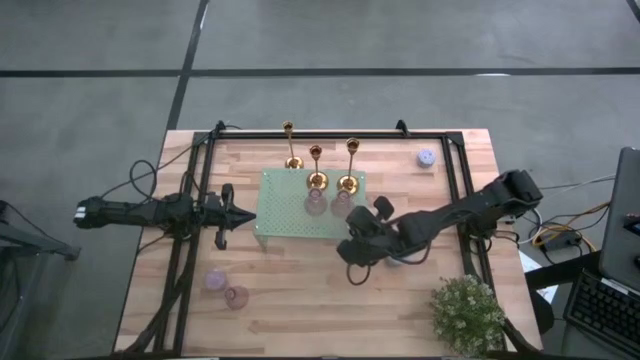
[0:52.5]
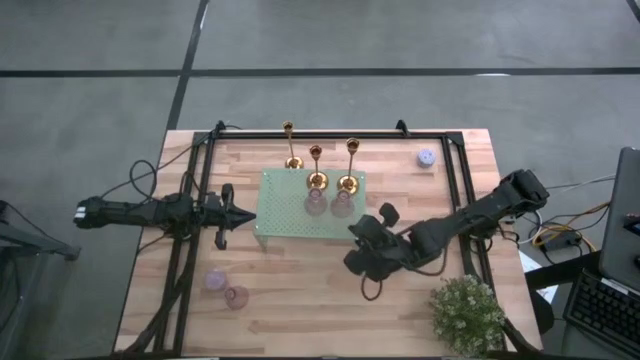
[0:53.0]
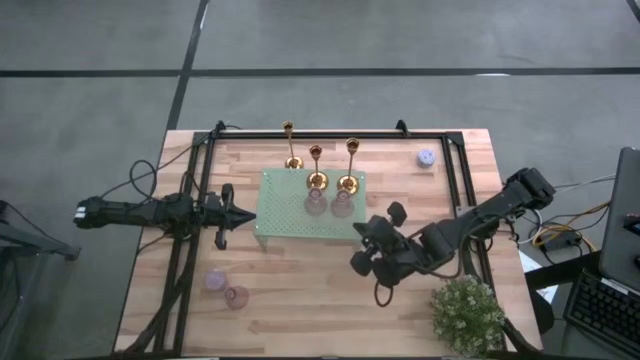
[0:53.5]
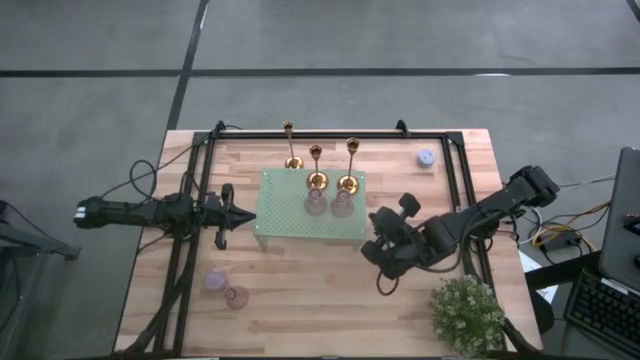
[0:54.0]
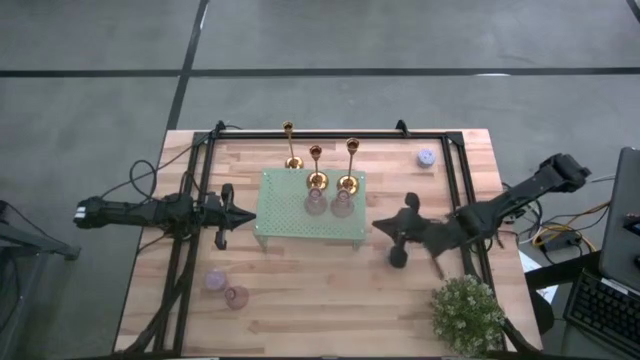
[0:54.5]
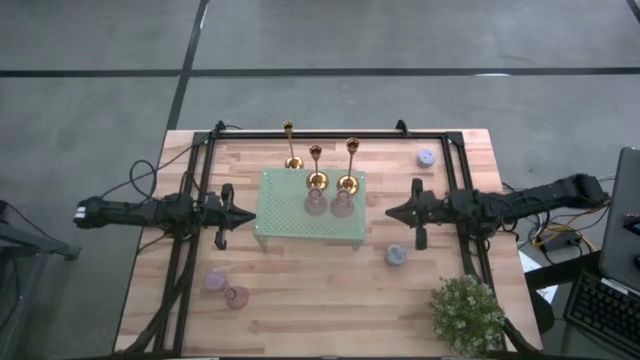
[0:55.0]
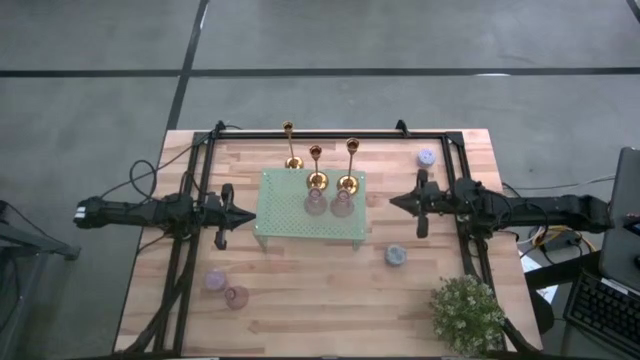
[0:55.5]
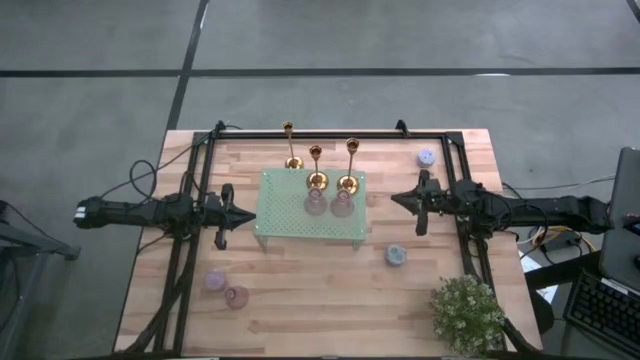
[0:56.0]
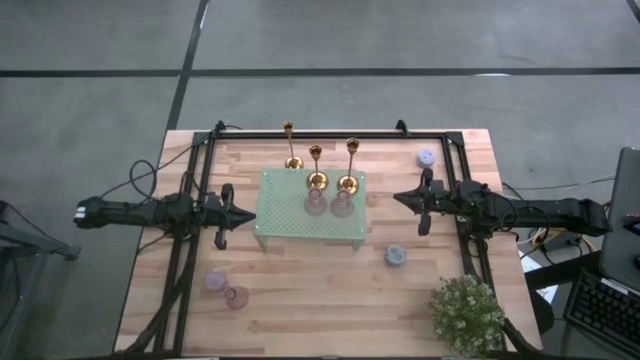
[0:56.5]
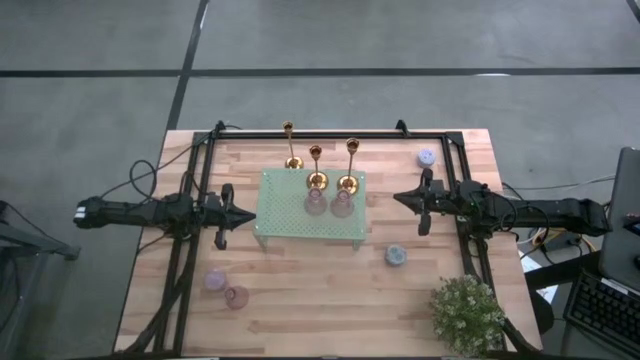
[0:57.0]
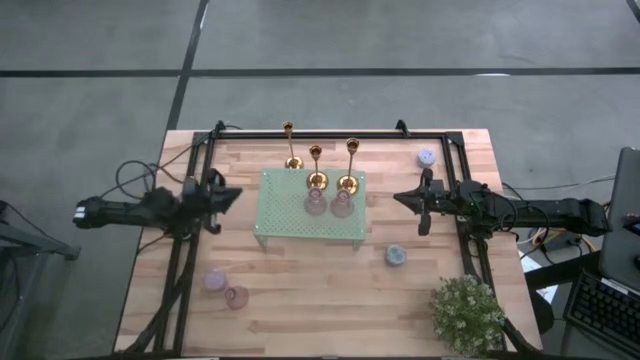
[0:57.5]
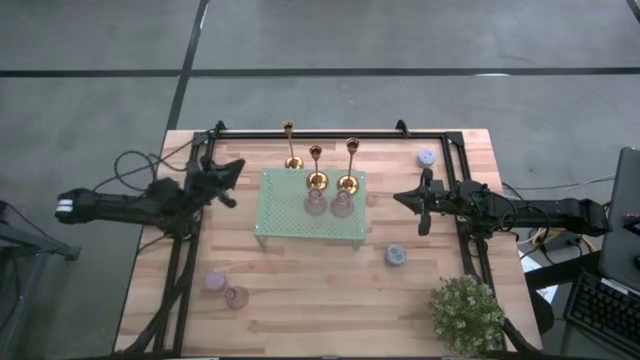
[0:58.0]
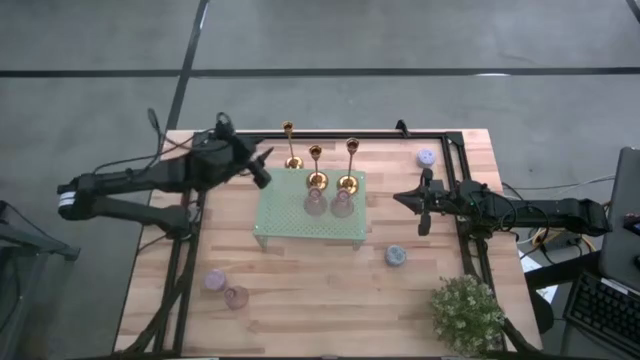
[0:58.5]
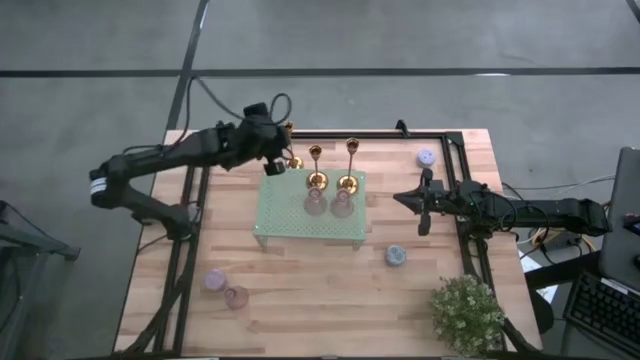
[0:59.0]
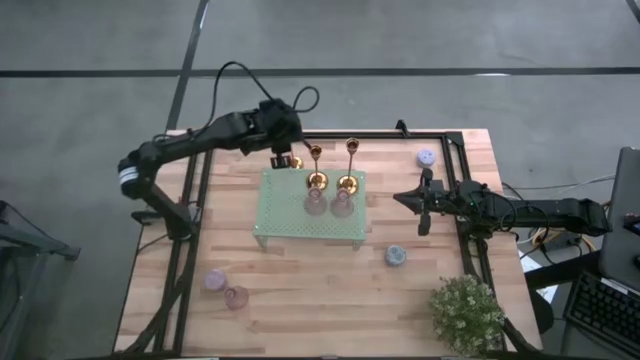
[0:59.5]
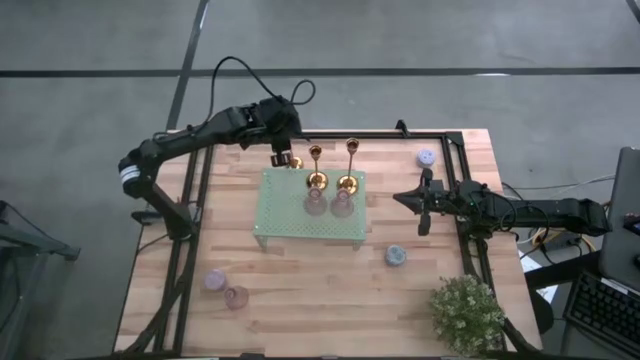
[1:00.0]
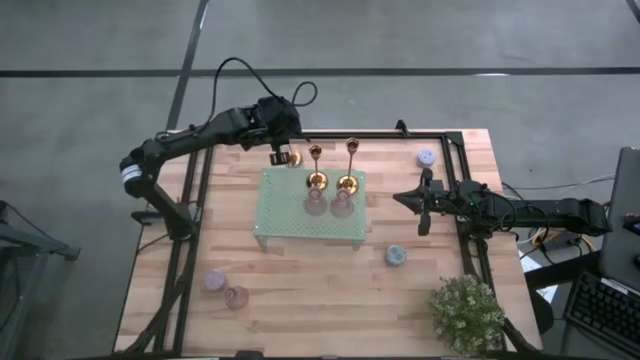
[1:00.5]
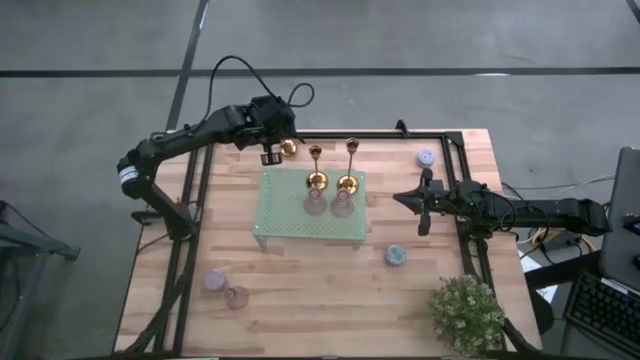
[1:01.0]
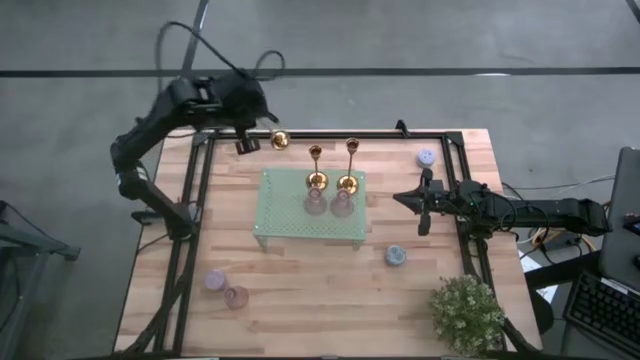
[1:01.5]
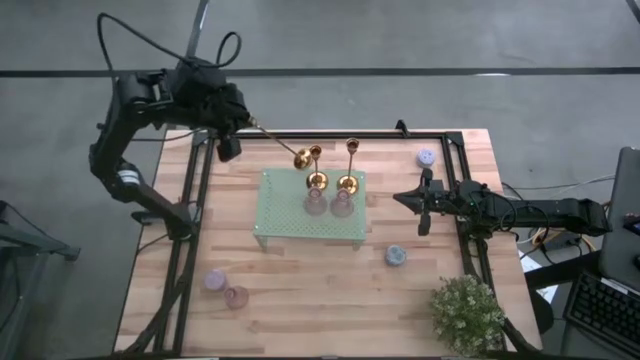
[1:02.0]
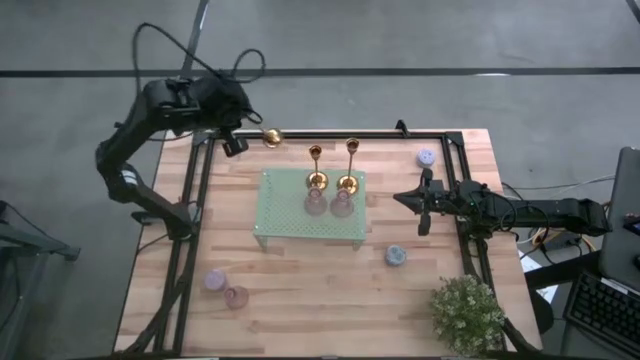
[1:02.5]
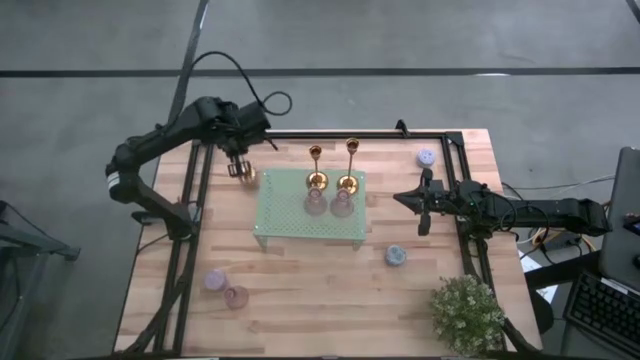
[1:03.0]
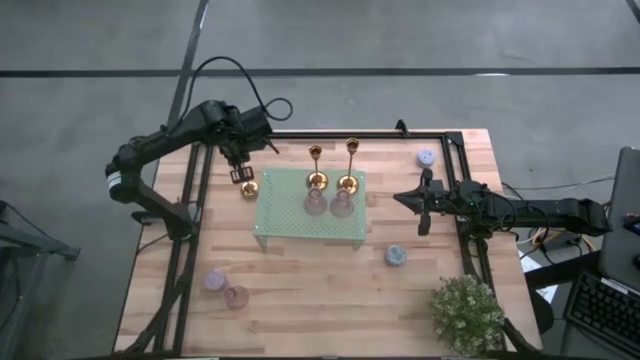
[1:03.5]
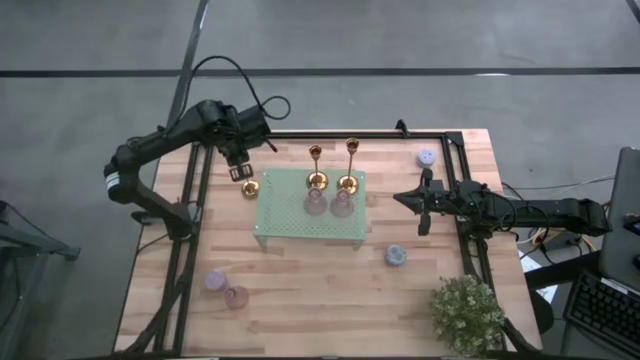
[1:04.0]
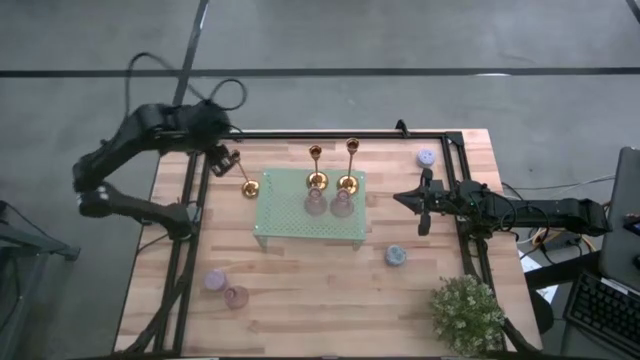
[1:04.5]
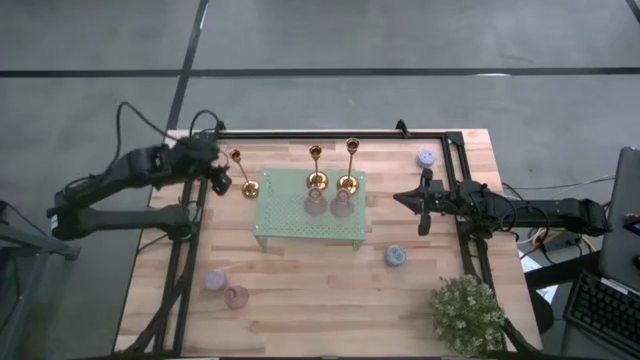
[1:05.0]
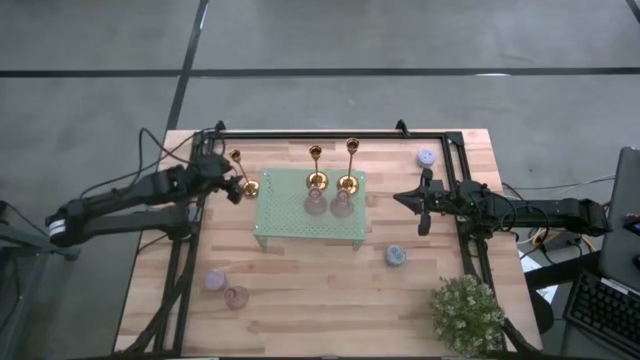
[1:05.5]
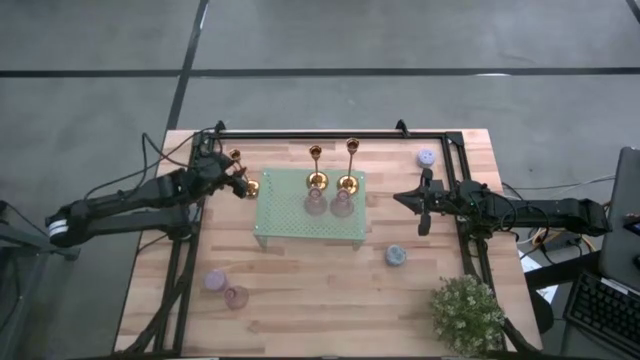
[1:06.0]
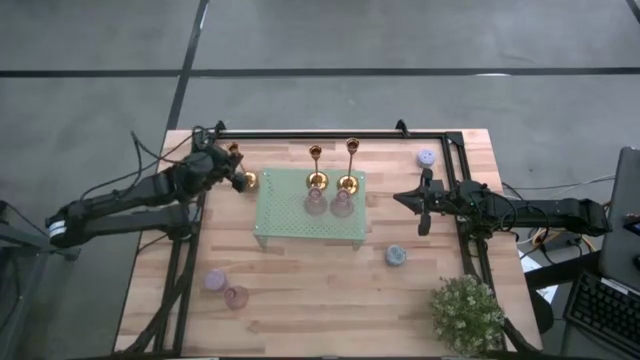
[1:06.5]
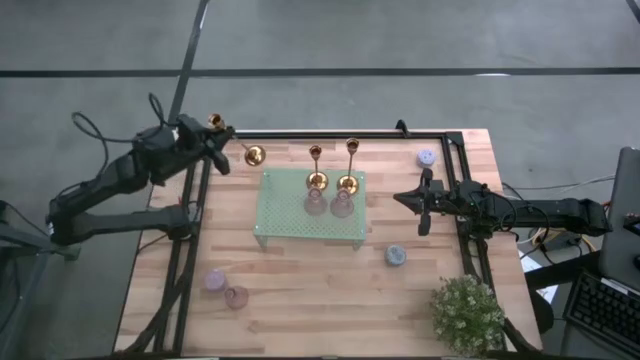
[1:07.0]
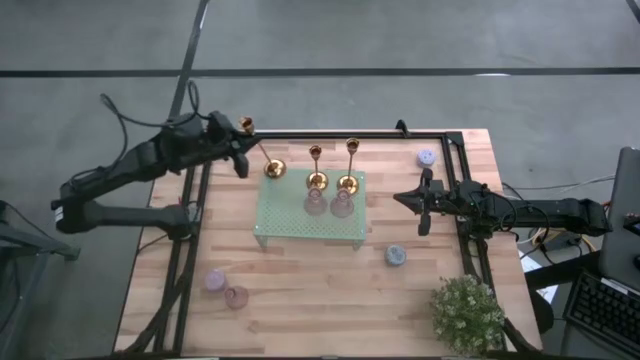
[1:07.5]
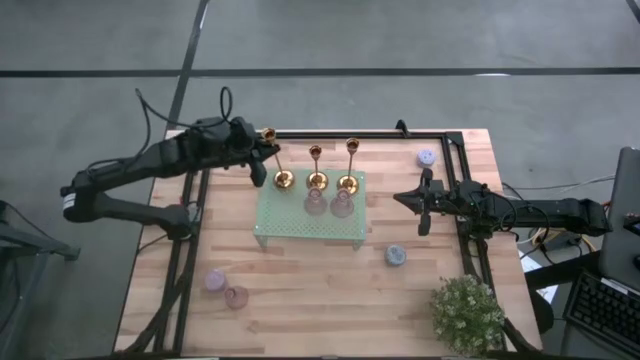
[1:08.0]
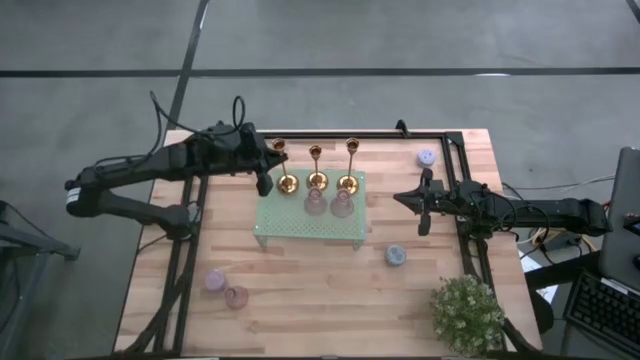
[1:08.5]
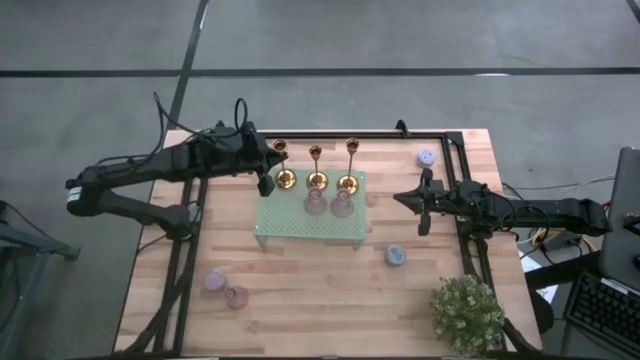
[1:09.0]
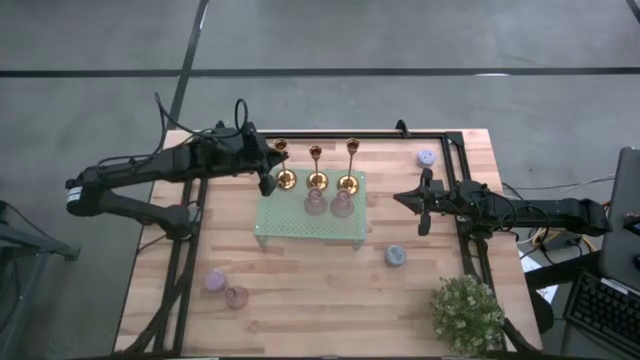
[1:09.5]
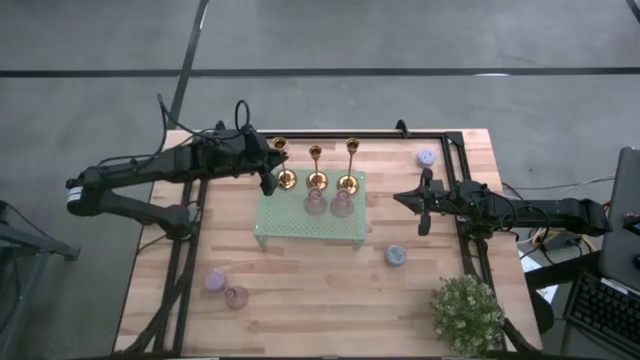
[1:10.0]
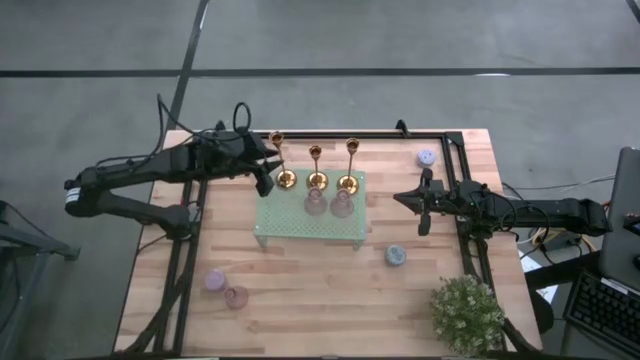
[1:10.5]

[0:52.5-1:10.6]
Task: Pick & Place candle stick holders
Put the gold candle holder on the shelf aligned with the other gold candle holders

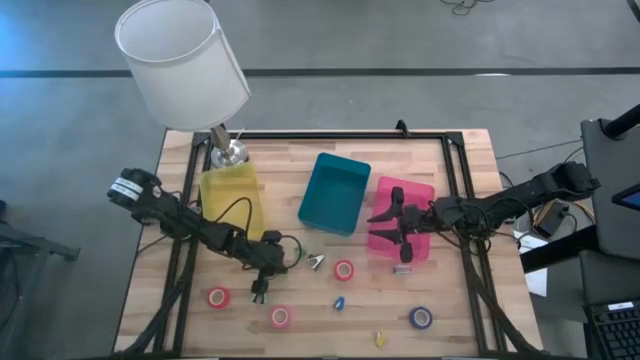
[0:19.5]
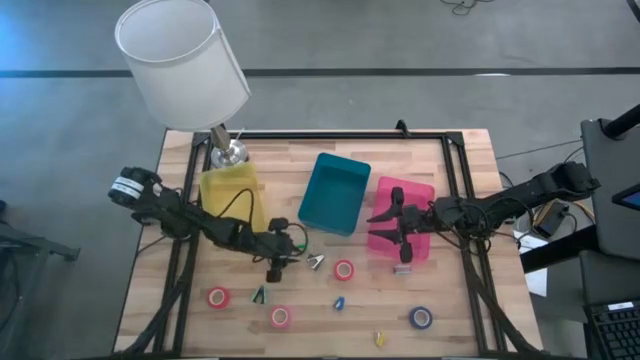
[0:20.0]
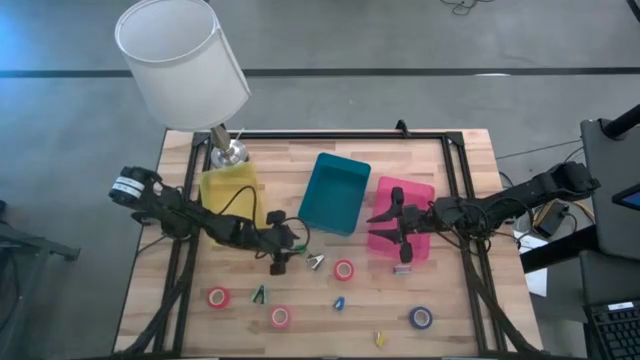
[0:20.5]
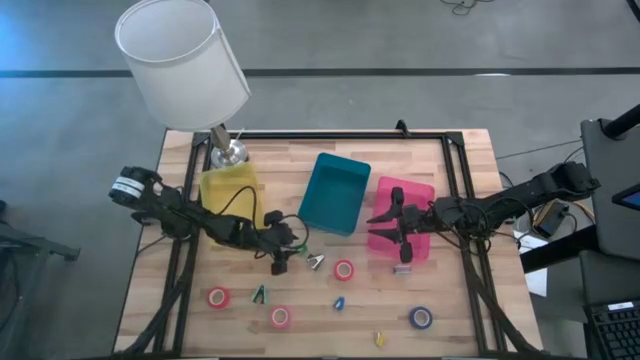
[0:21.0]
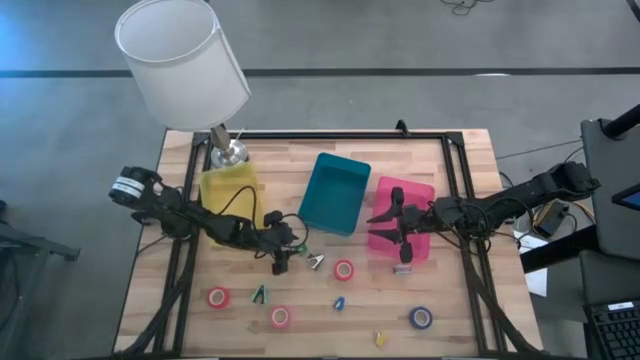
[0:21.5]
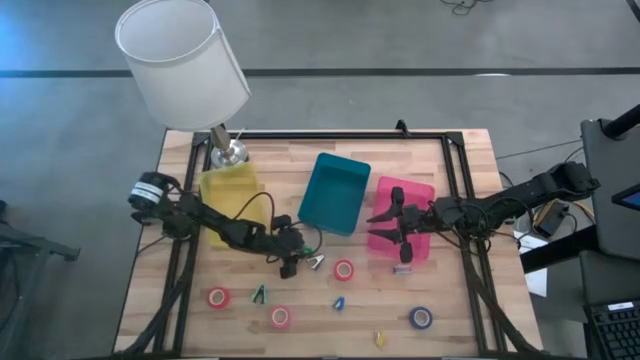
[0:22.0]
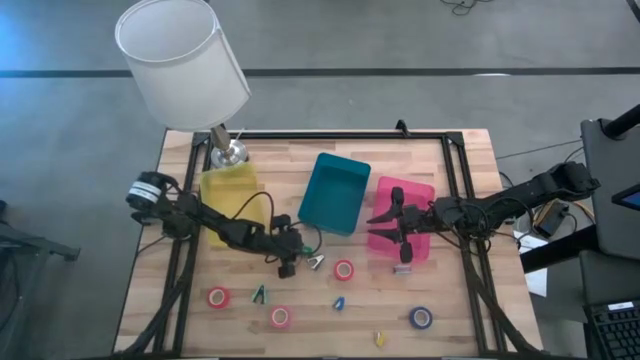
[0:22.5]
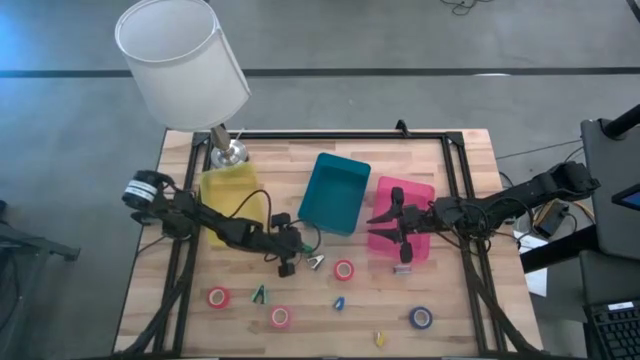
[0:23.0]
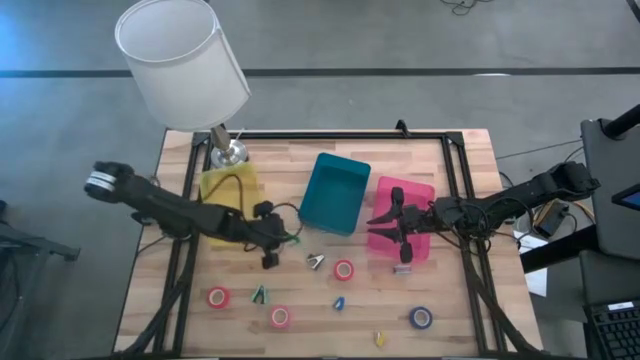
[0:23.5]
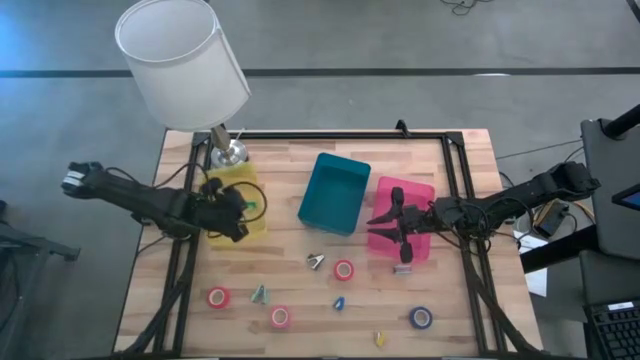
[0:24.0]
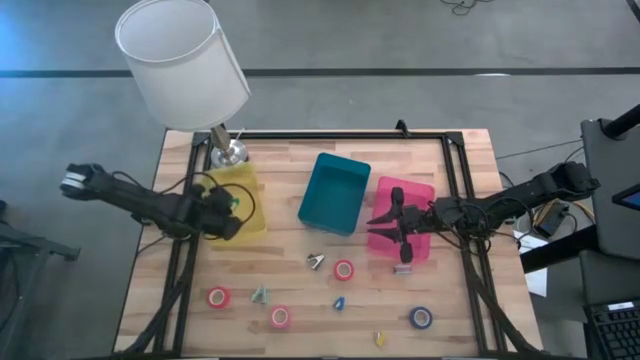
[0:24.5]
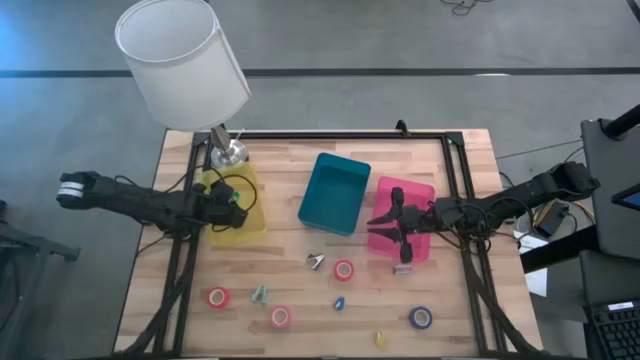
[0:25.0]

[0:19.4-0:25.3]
Task: Pick and place Stapler, Stapler remover, tape
Put the green stapler into the yellow bin
